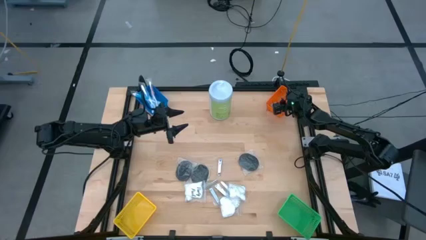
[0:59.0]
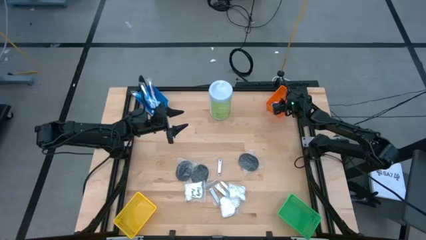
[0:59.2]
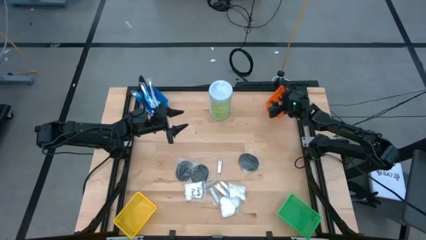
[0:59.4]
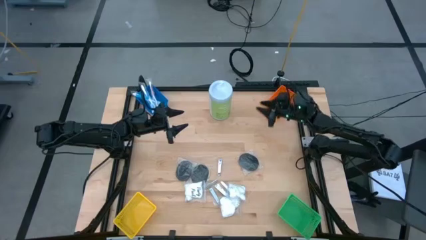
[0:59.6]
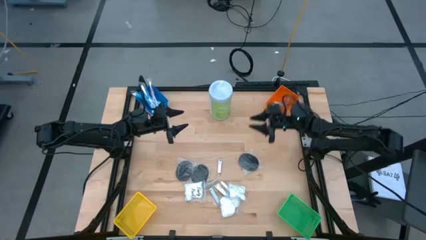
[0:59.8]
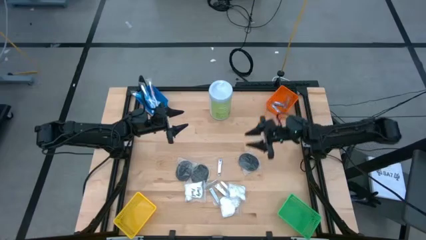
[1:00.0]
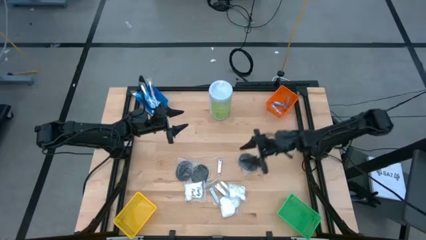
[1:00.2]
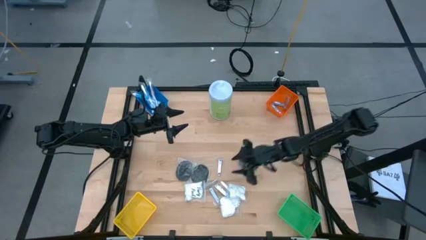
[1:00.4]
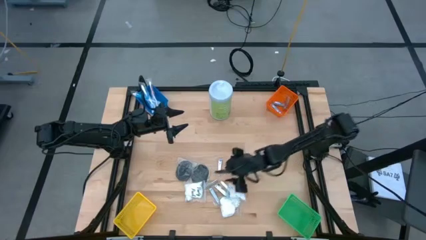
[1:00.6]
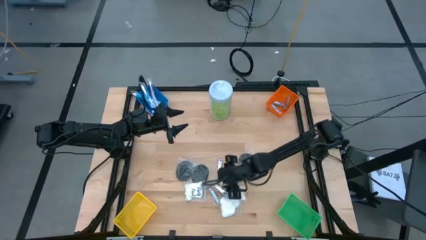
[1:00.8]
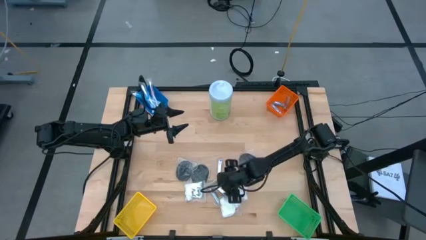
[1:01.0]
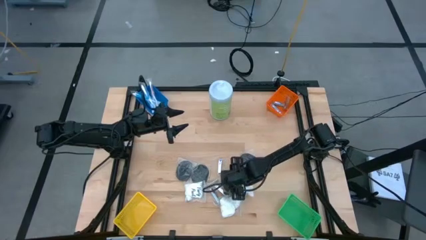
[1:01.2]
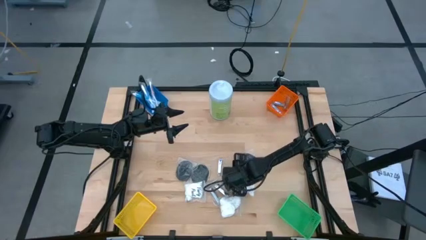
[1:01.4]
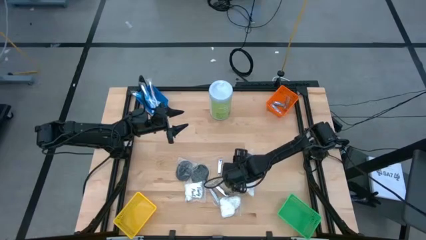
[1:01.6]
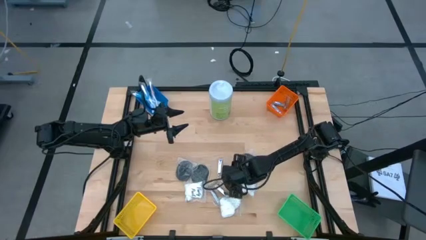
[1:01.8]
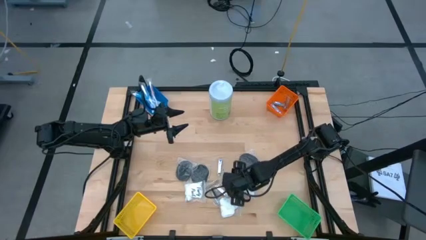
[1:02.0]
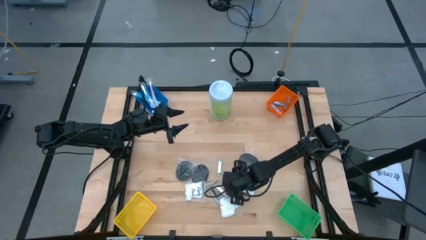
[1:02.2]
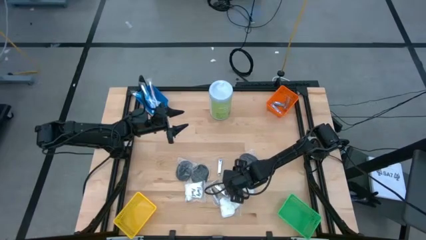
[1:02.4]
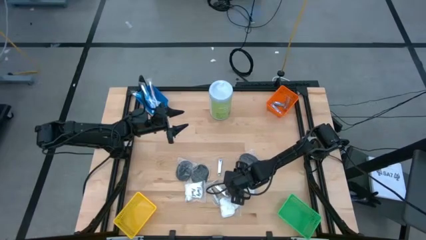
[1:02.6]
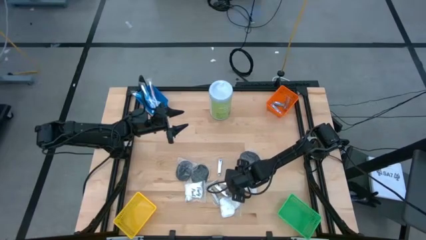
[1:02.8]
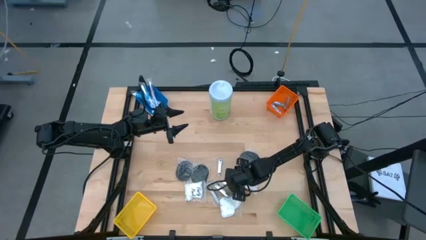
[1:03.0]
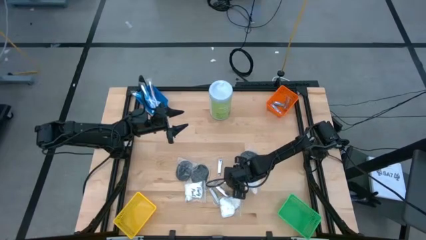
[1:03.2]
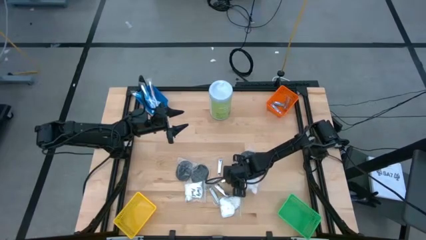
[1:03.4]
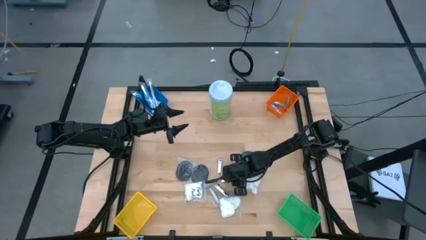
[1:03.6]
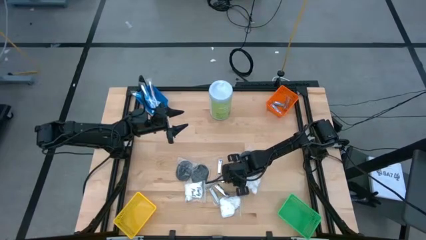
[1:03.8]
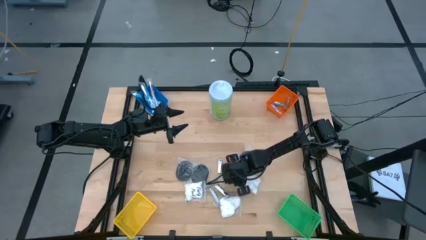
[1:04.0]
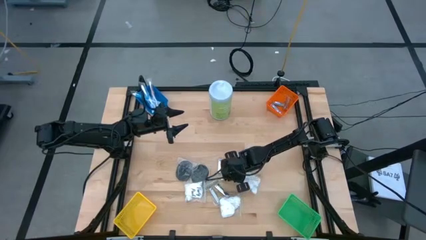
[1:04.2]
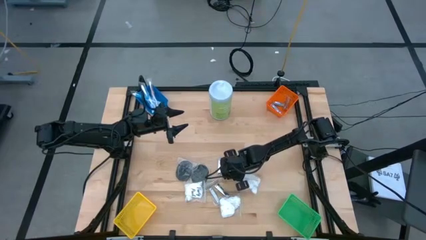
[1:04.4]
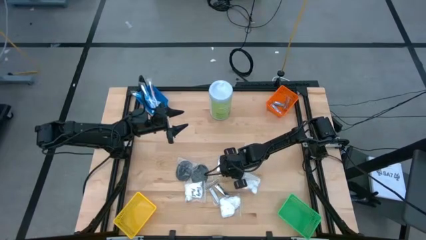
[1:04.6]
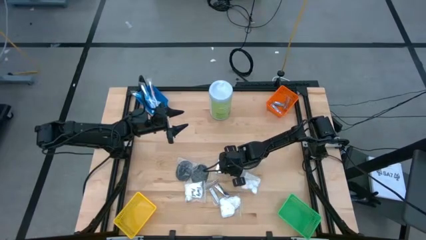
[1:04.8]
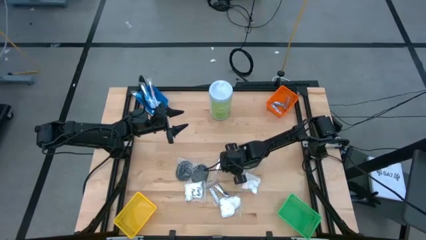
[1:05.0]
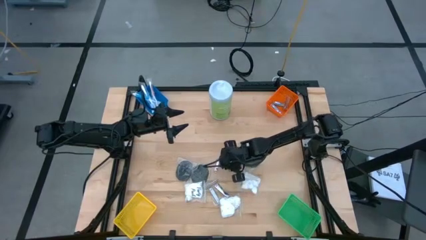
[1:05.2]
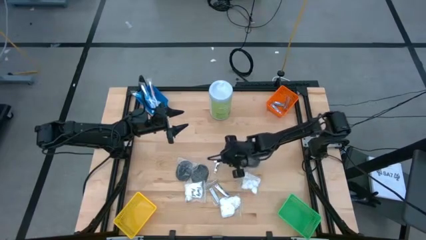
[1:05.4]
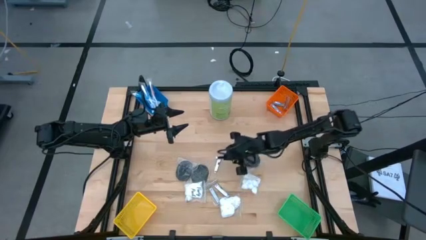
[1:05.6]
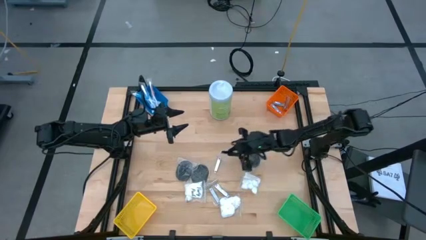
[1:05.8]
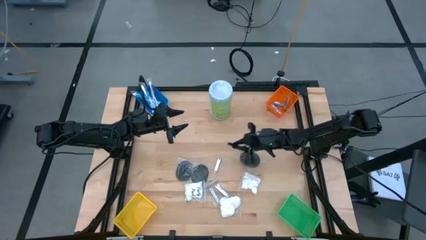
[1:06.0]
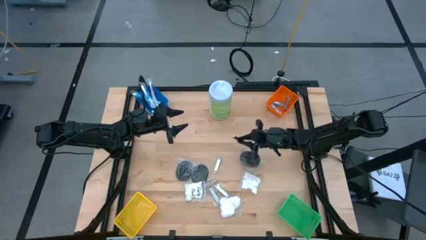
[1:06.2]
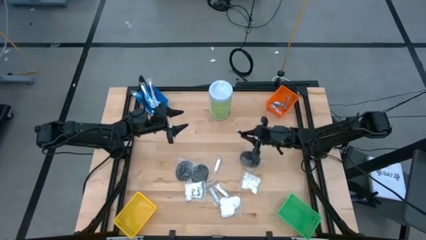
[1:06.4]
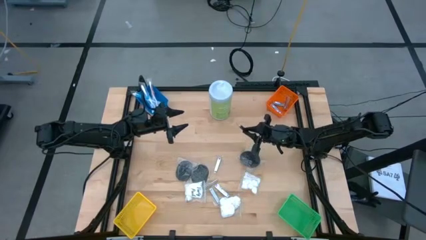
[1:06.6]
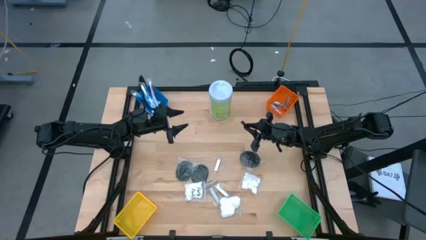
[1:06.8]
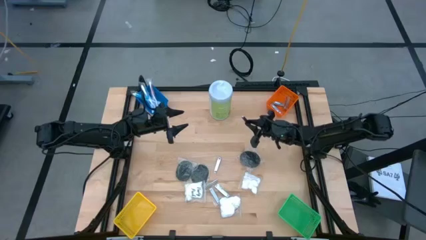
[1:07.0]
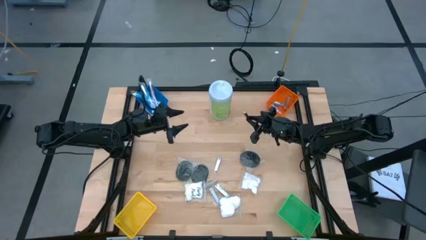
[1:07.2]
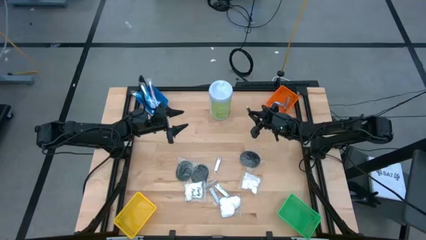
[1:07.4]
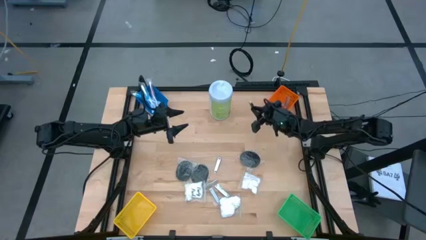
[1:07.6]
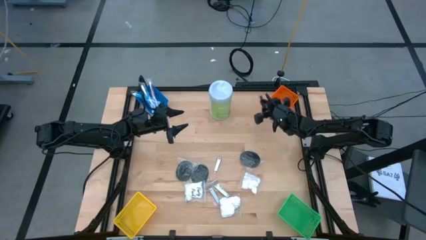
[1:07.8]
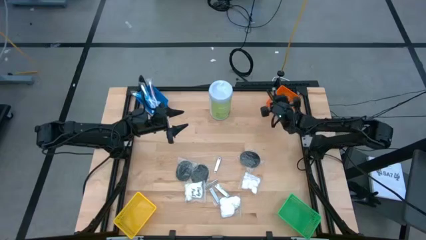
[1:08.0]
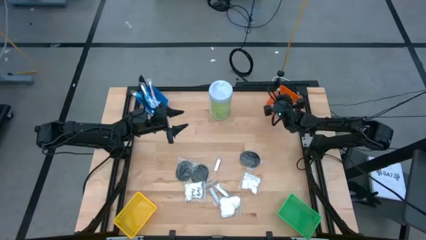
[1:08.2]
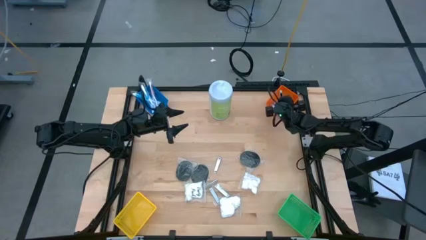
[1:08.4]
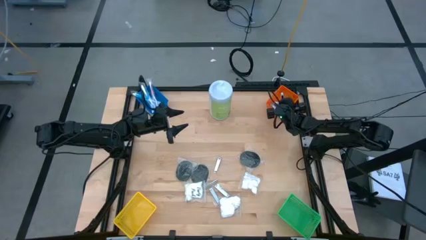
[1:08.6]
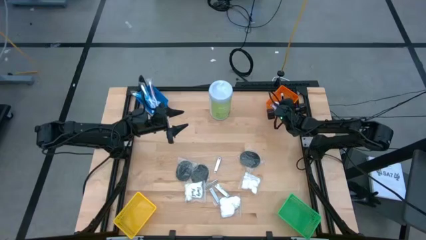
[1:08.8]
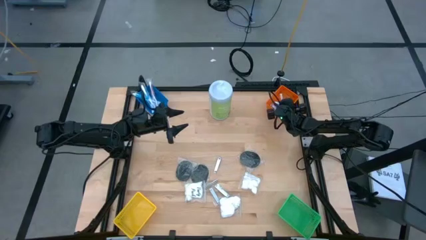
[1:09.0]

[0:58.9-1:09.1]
Task: Pick & Place Travel size toiletries
Put the nail cutter into the orange bin

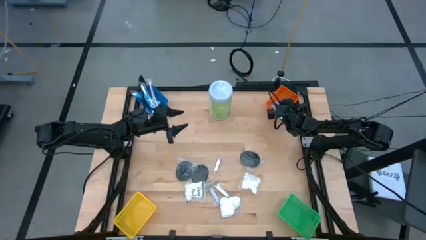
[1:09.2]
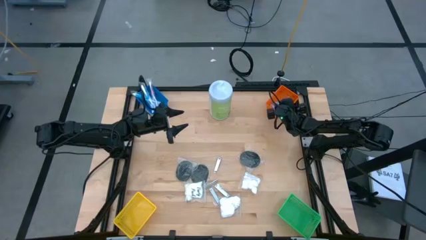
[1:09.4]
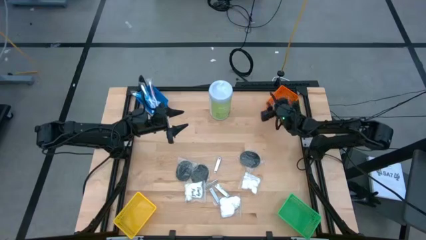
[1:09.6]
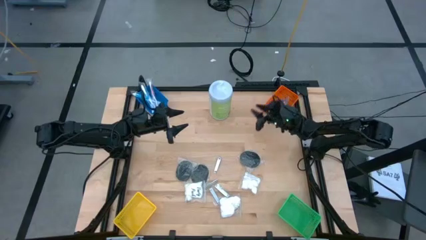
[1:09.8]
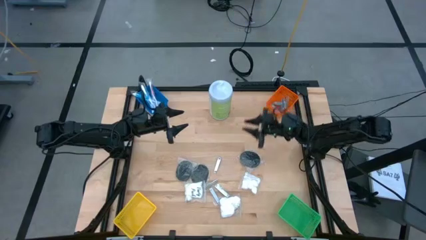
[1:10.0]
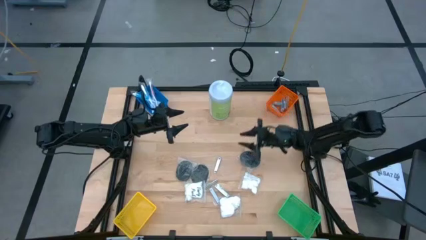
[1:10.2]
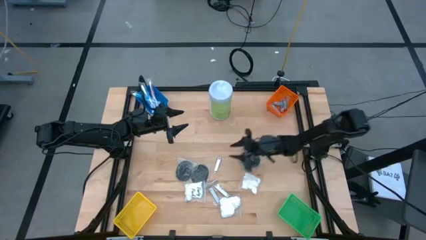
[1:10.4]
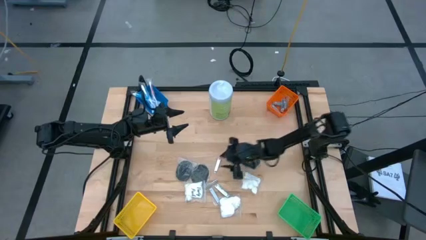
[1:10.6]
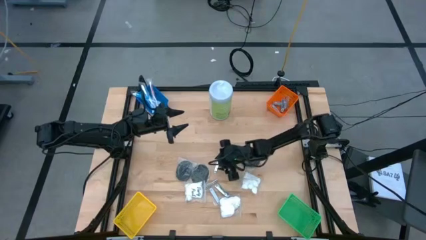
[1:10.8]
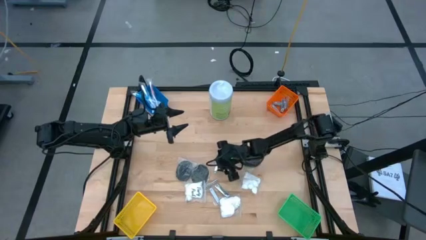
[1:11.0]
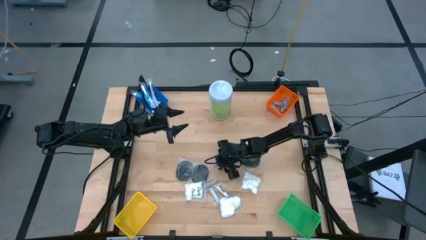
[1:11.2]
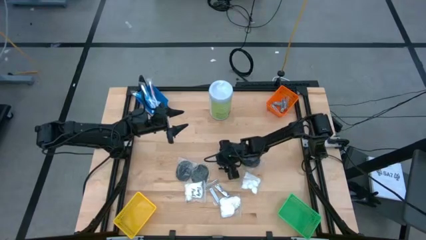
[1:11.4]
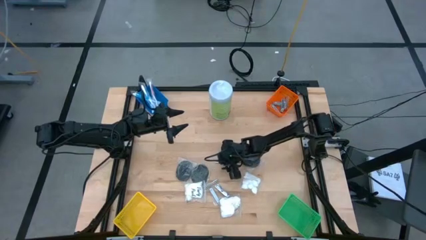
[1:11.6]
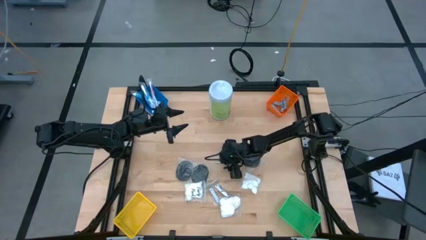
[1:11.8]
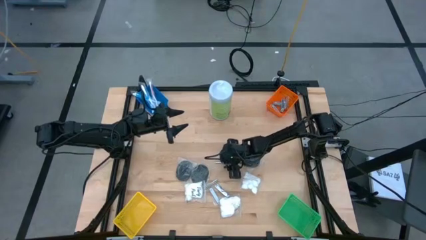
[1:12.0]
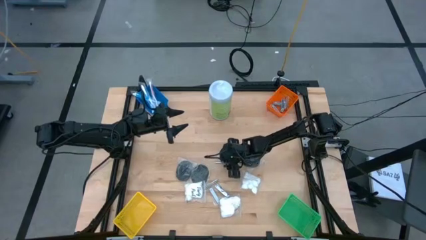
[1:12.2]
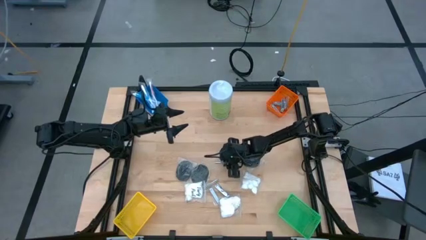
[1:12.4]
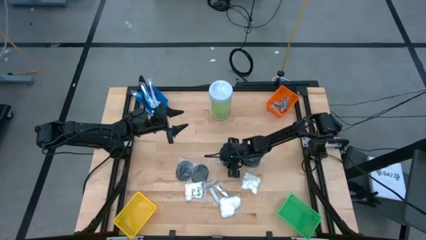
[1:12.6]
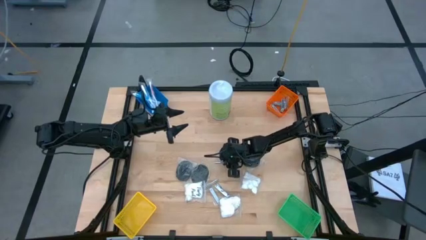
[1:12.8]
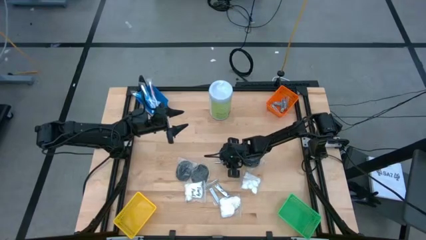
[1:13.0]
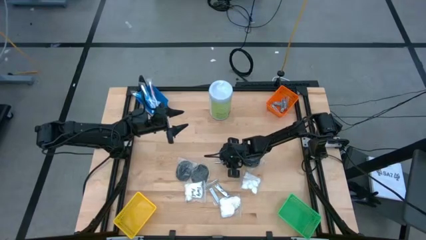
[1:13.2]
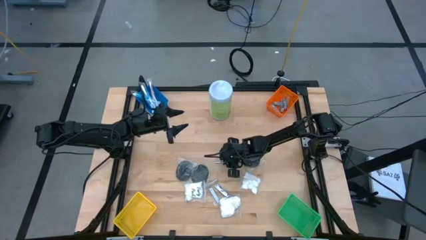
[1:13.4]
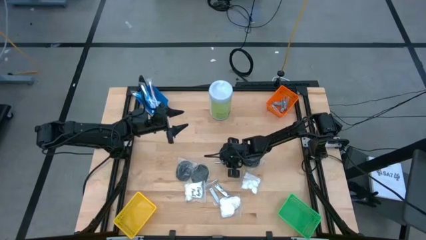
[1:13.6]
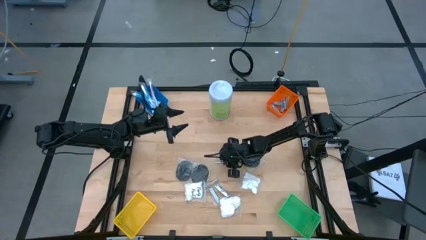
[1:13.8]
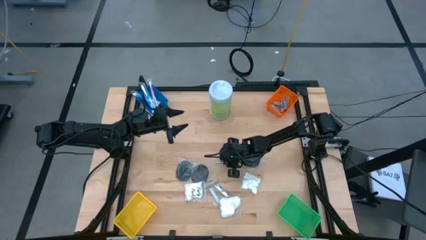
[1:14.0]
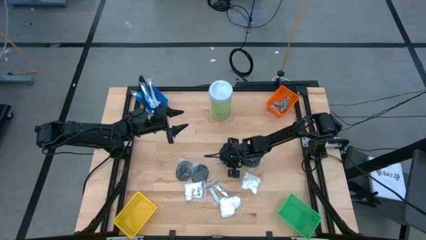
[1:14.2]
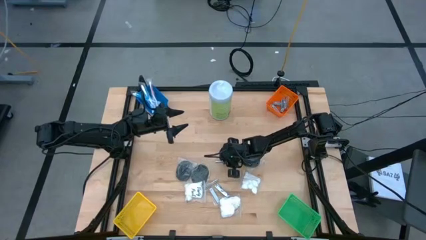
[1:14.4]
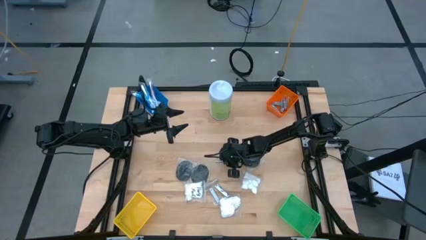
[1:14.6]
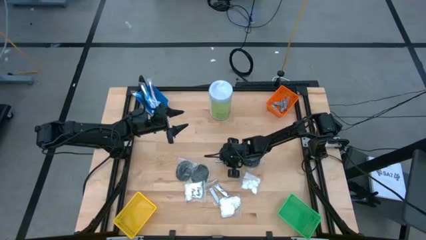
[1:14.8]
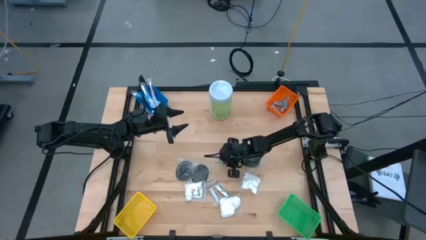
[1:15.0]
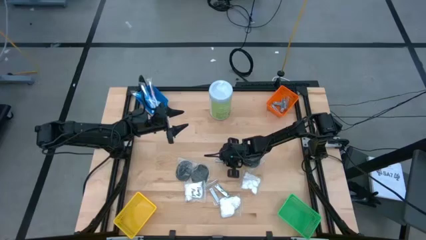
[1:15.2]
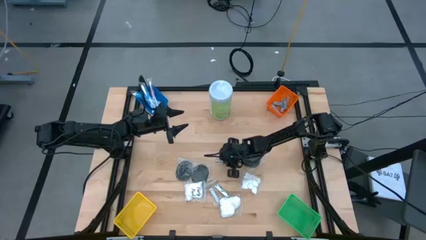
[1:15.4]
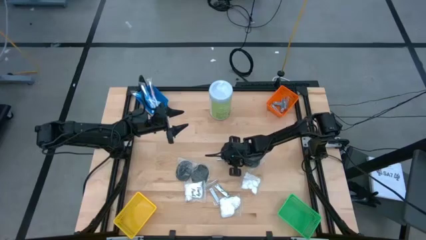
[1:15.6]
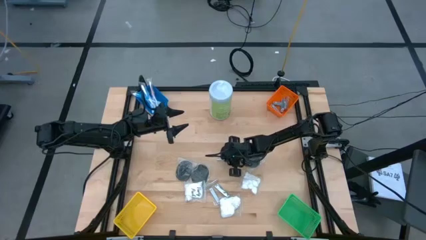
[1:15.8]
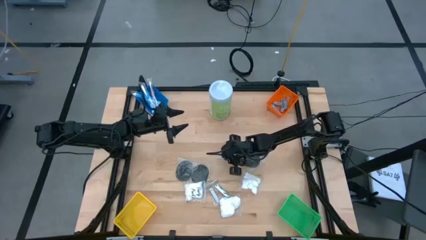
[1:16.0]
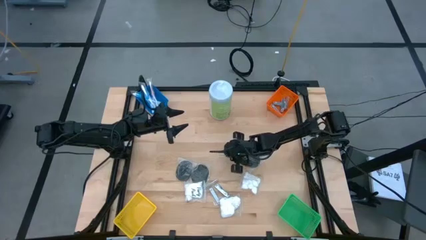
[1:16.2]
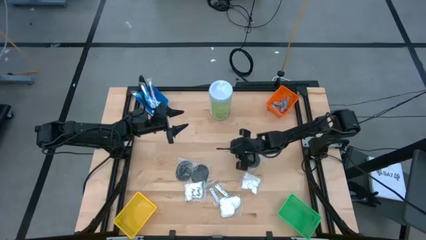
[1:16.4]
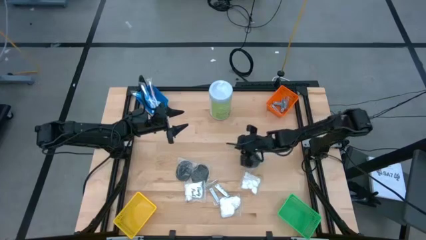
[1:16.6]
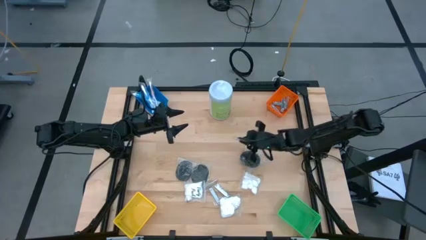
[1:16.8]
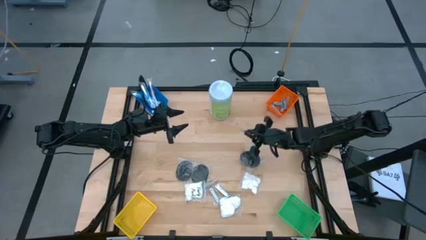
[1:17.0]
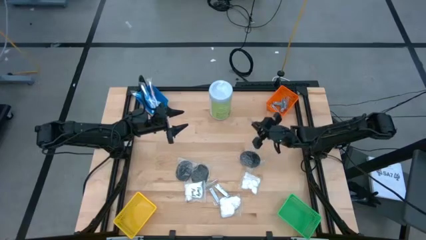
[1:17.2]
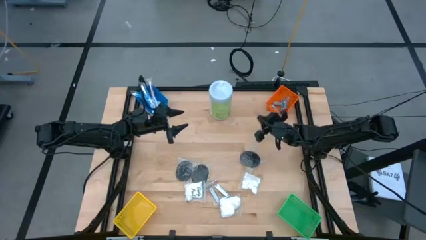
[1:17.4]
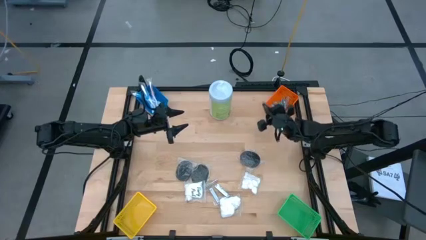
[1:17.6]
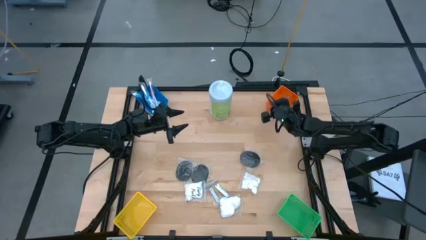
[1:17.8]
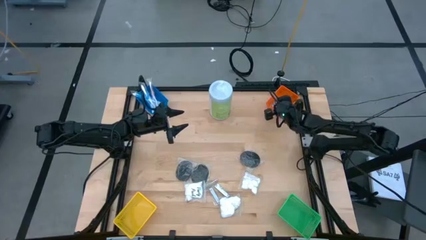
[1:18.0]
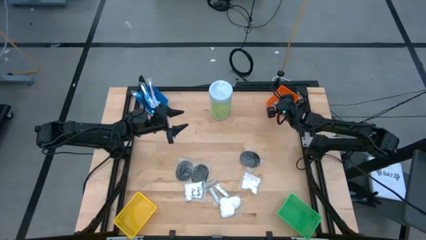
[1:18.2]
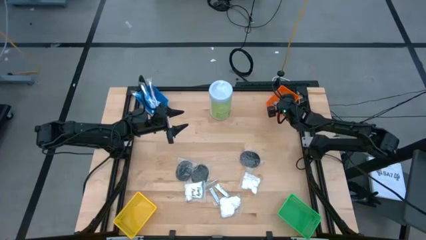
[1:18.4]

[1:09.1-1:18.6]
Put the nail cutter into the orange bin
